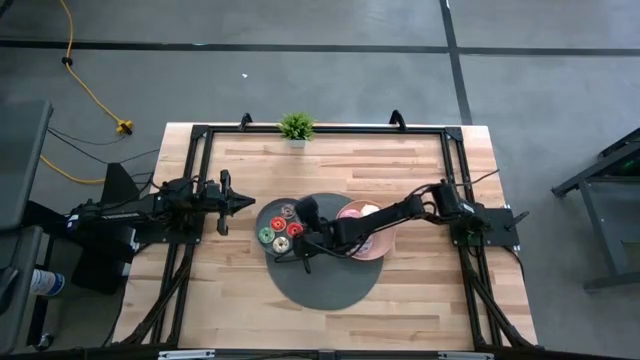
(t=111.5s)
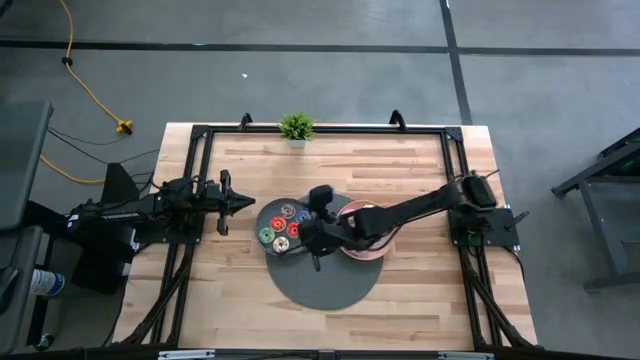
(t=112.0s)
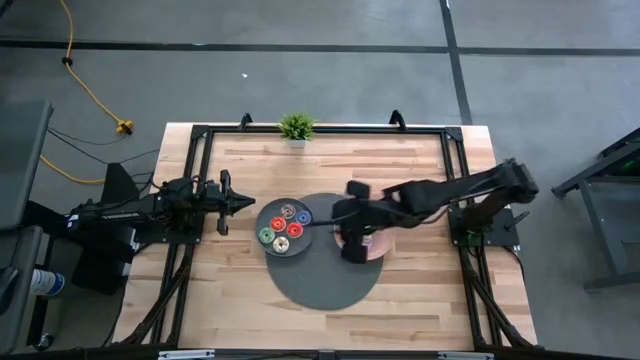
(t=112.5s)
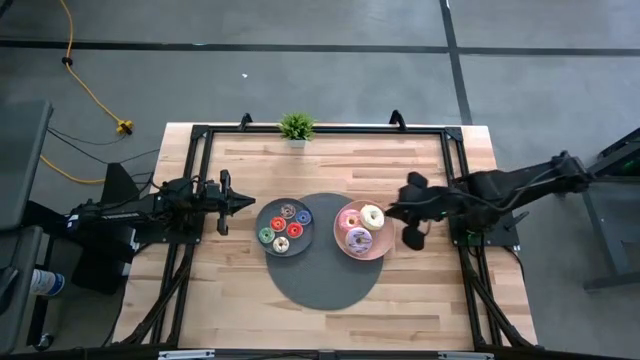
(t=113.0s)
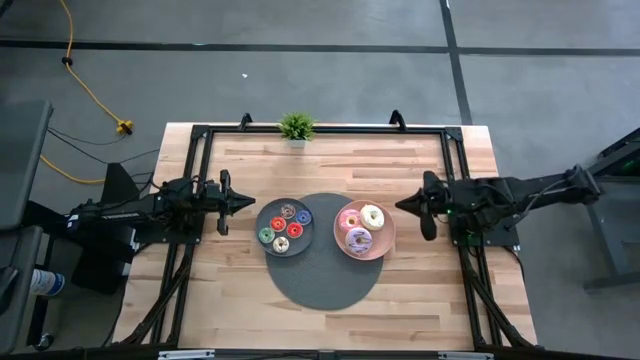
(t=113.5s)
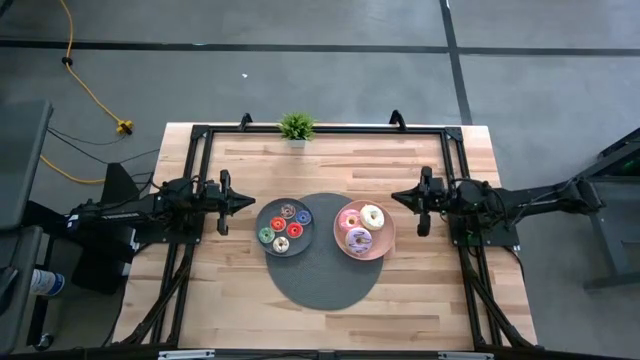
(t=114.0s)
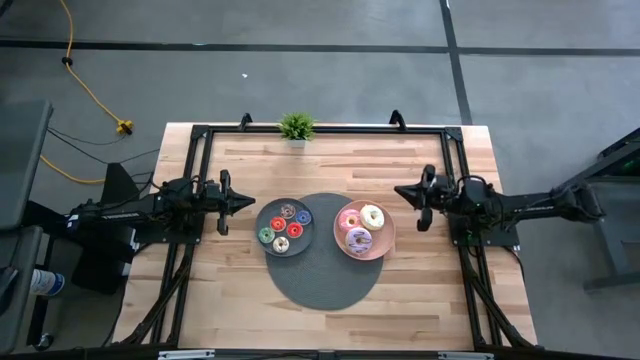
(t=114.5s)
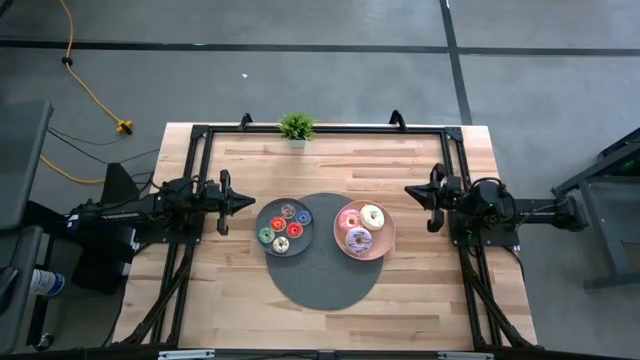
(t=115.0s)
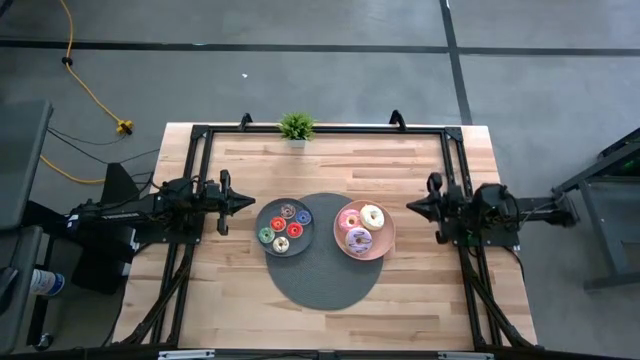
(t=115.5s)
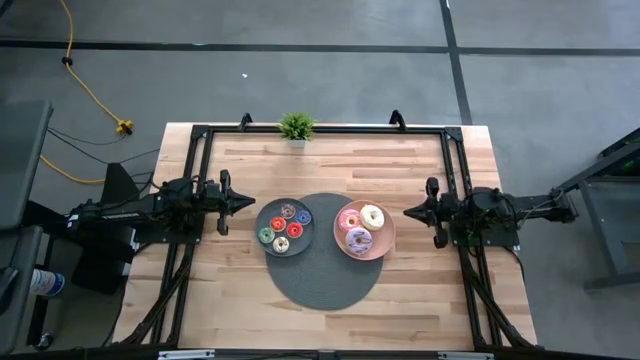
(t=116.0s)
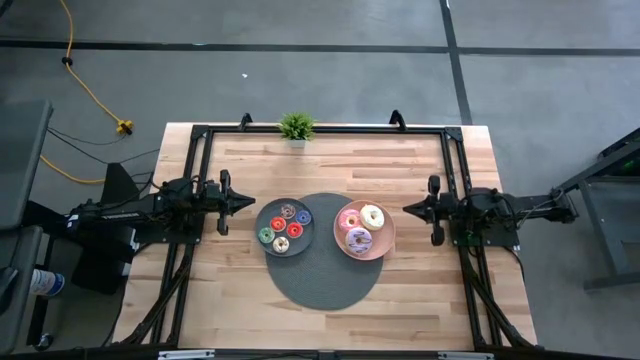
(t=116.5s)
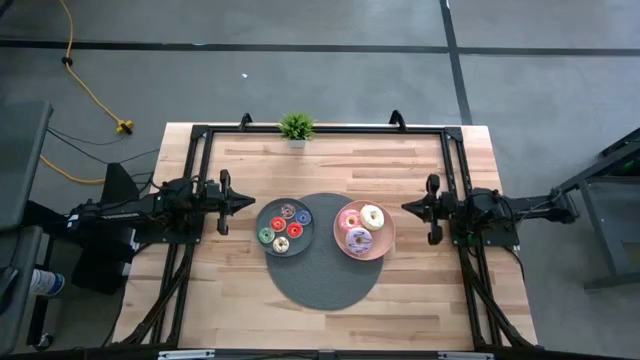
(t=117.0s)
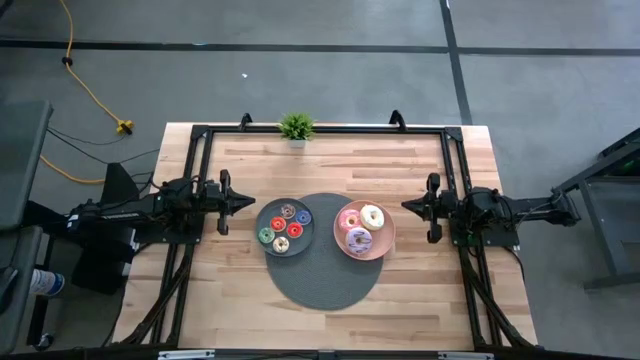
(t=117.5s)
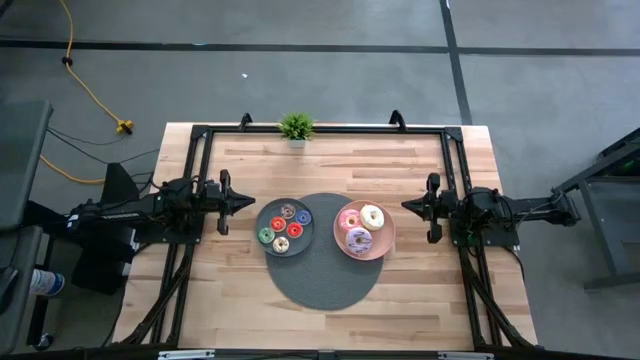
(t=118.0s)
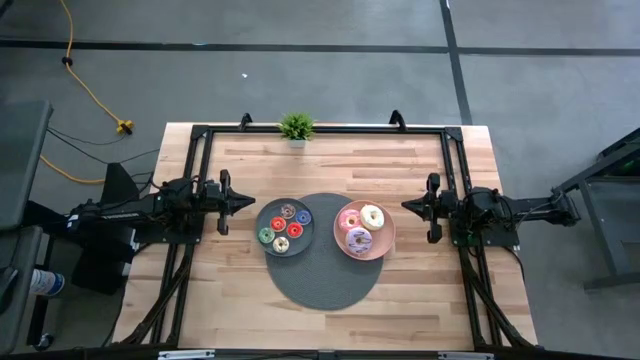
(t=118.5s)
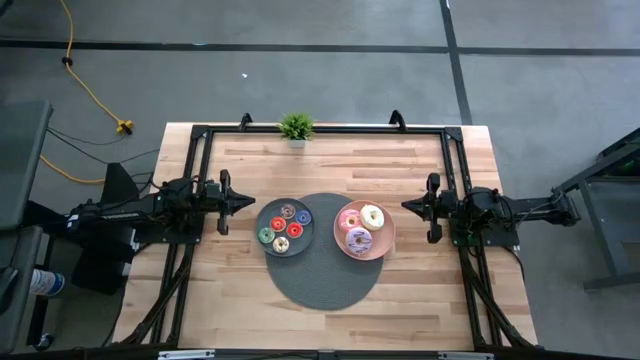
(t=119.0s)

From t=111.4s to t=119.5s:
Task: Pick & Place donuts
Return to Home Position

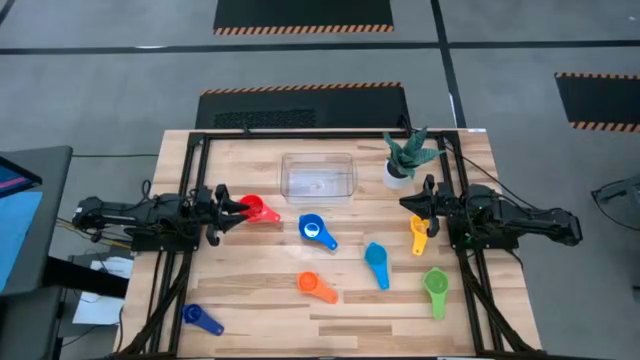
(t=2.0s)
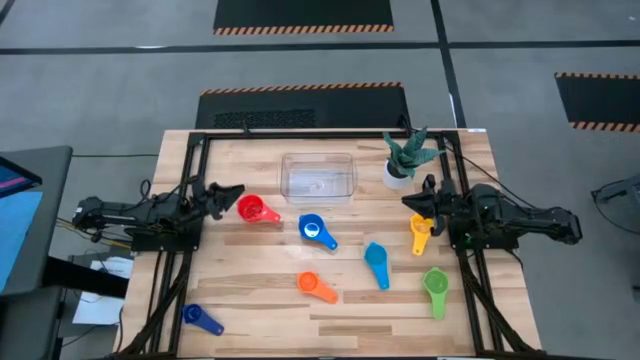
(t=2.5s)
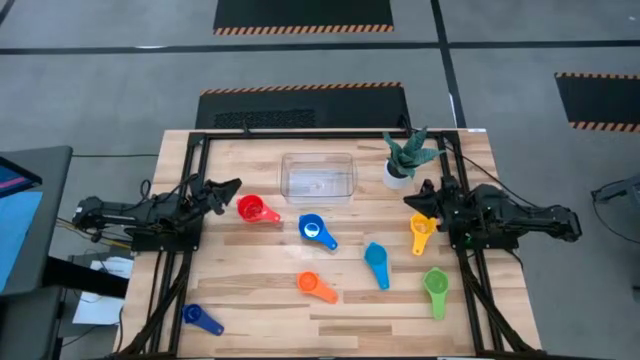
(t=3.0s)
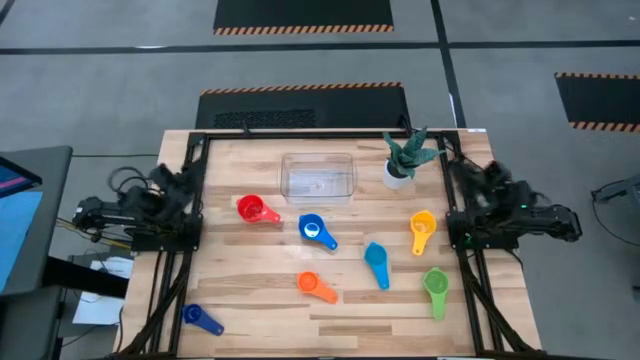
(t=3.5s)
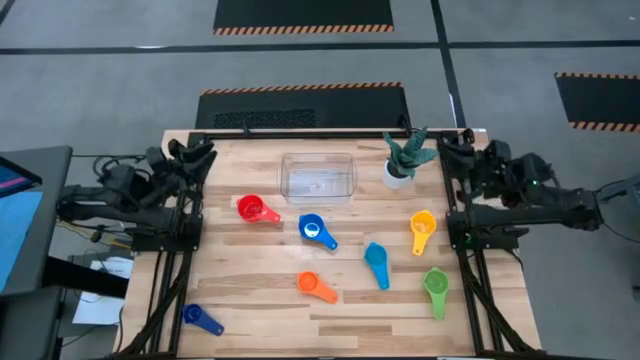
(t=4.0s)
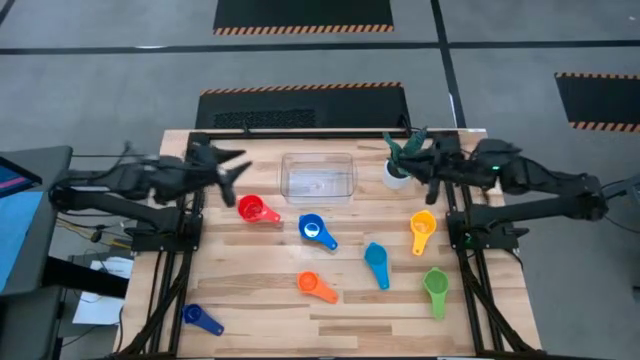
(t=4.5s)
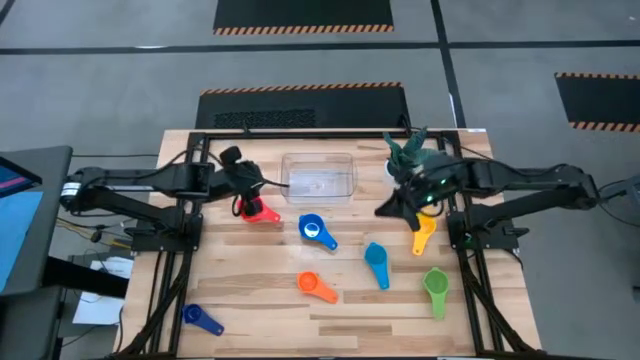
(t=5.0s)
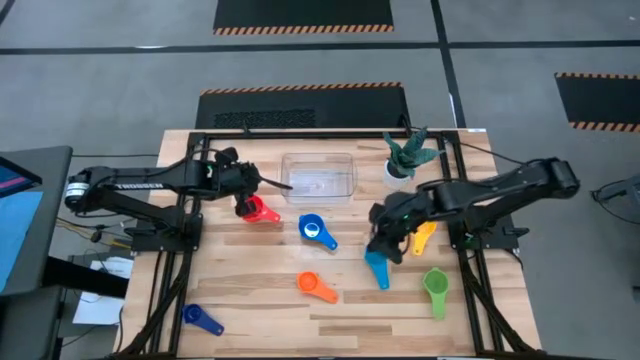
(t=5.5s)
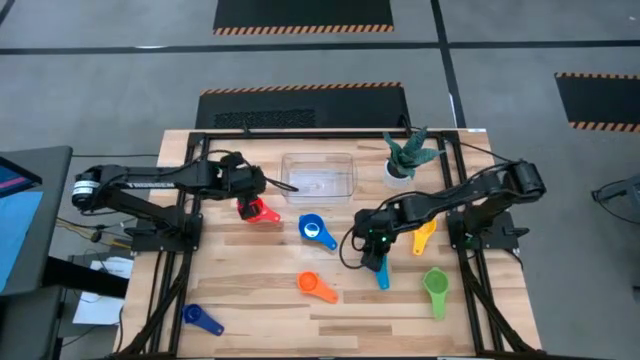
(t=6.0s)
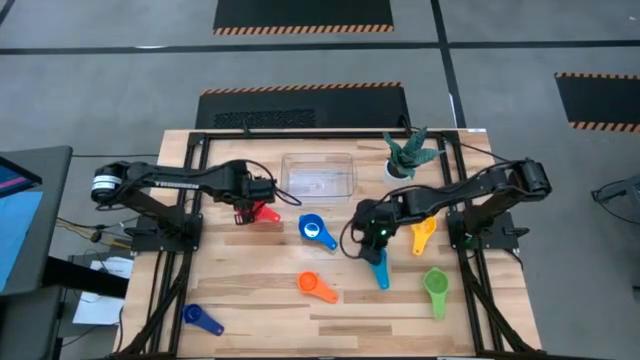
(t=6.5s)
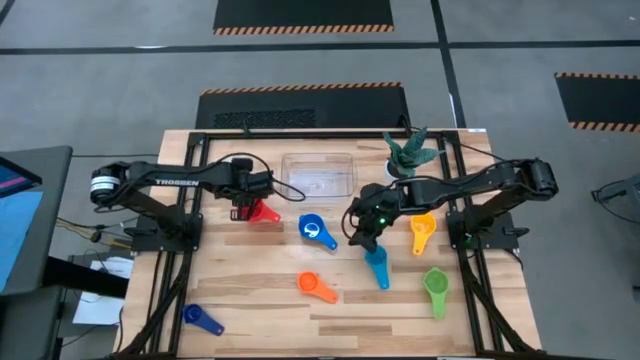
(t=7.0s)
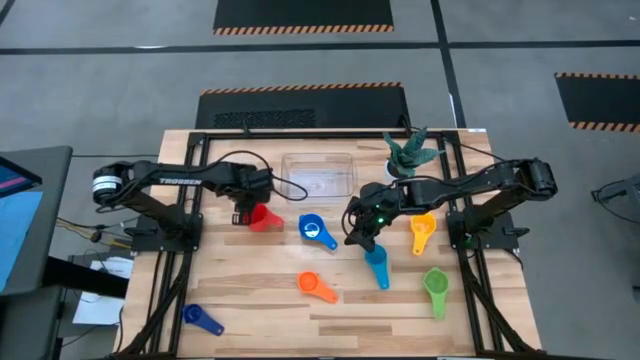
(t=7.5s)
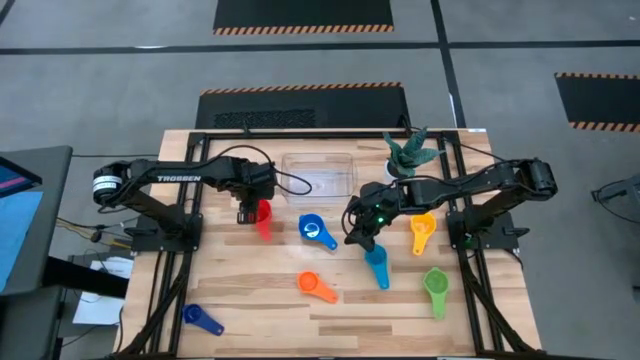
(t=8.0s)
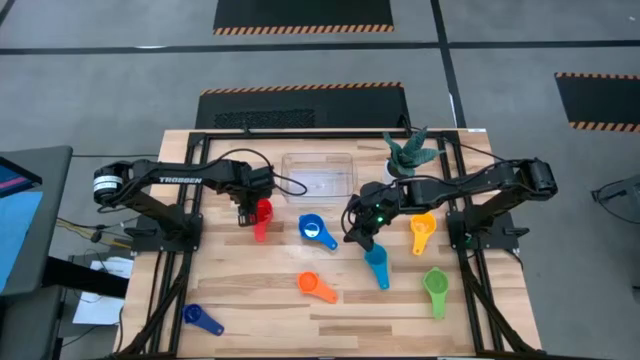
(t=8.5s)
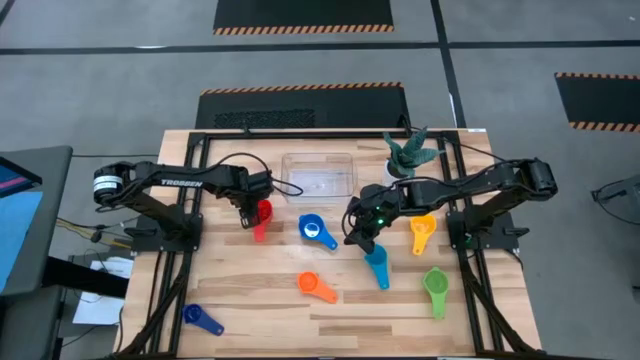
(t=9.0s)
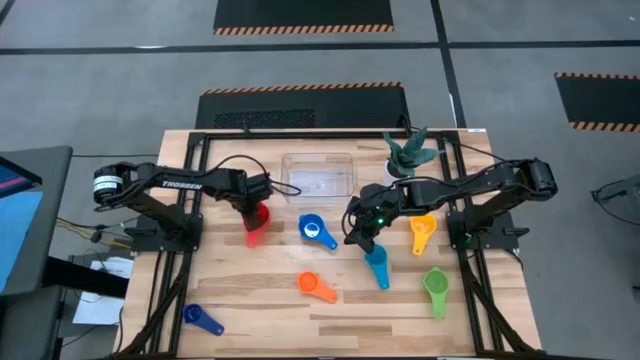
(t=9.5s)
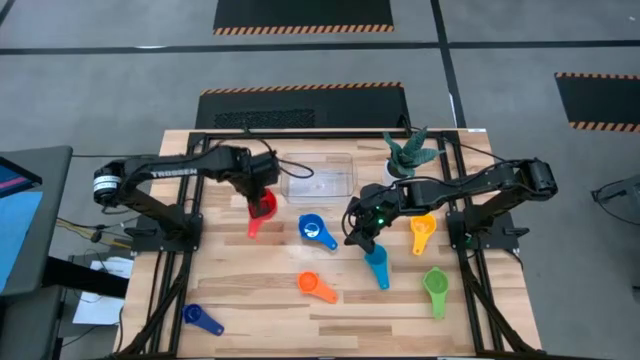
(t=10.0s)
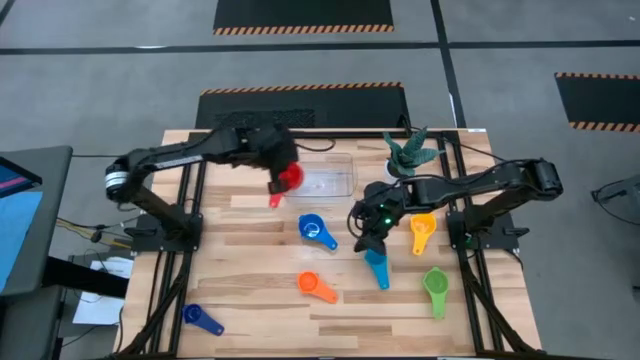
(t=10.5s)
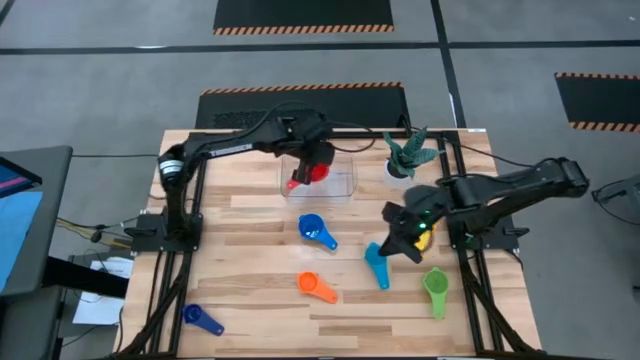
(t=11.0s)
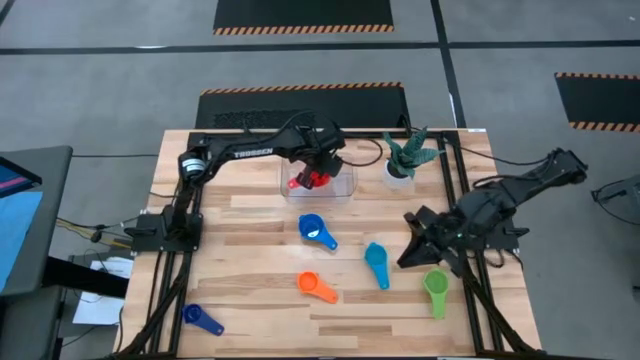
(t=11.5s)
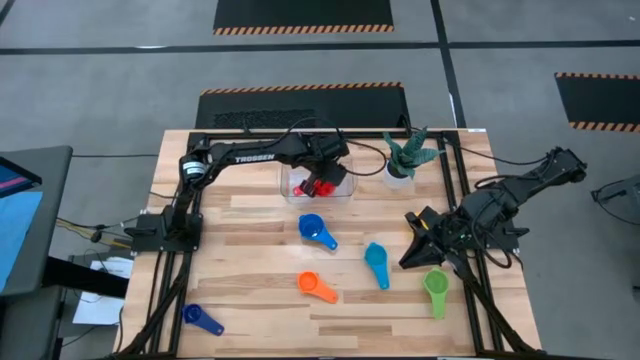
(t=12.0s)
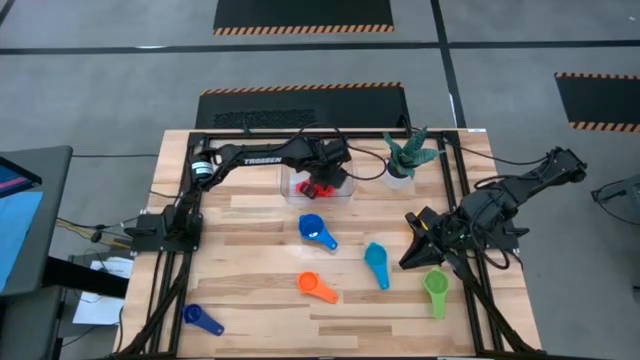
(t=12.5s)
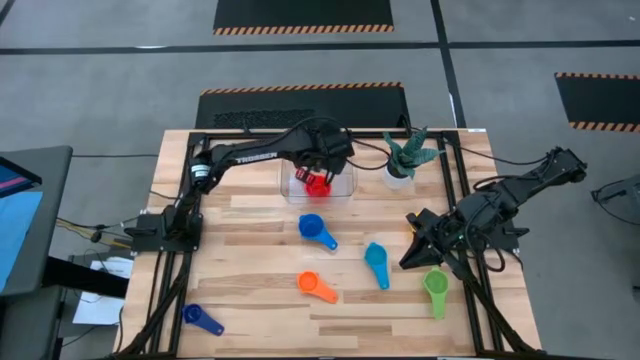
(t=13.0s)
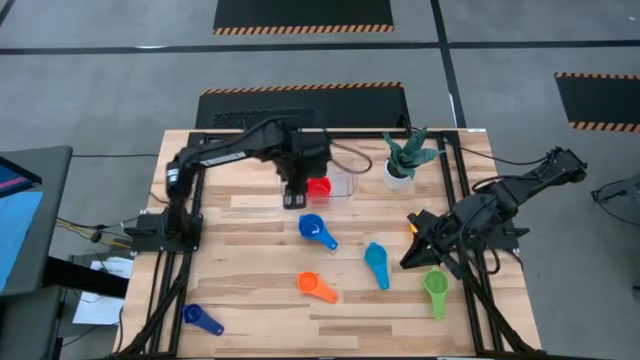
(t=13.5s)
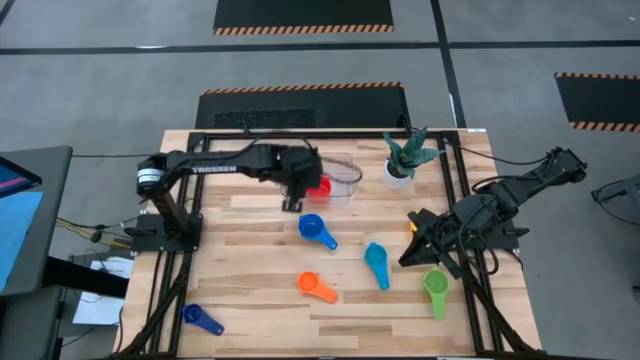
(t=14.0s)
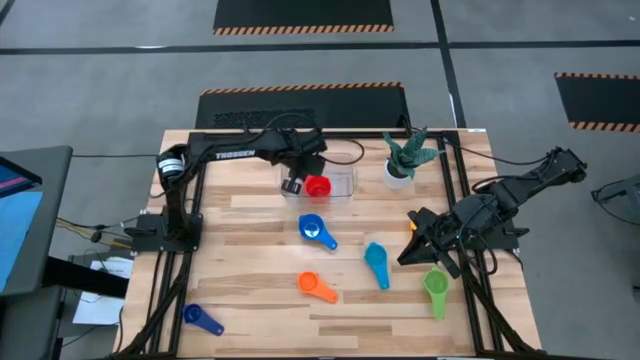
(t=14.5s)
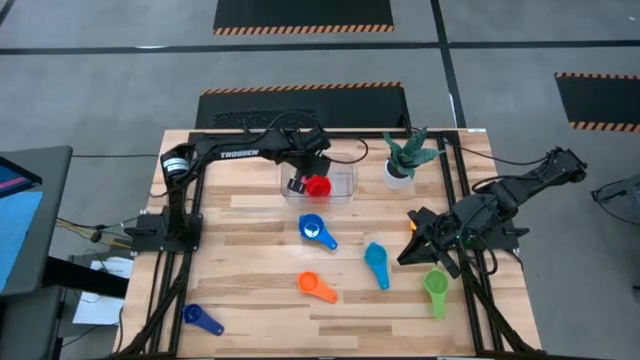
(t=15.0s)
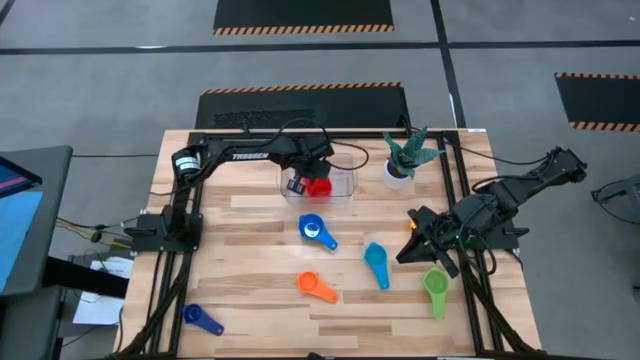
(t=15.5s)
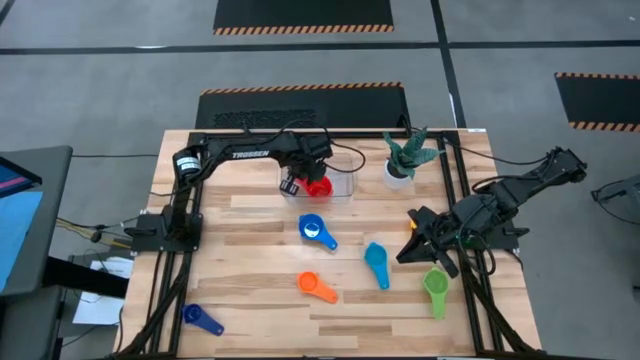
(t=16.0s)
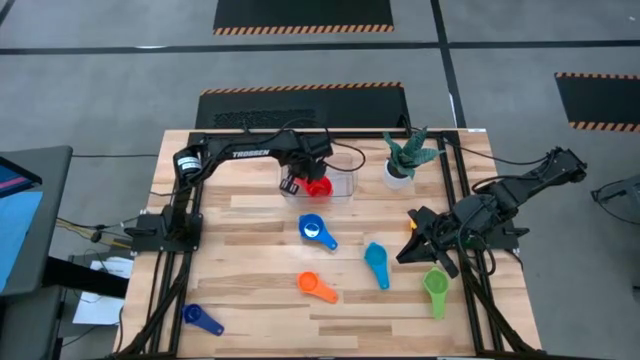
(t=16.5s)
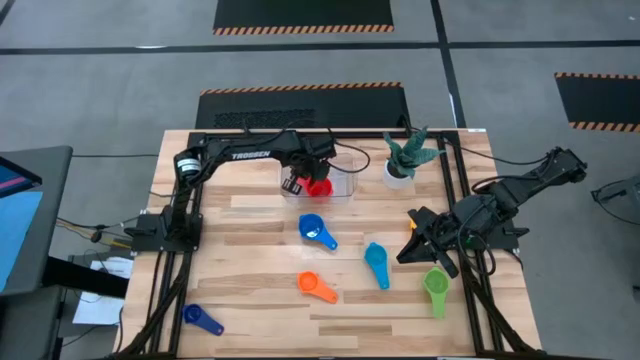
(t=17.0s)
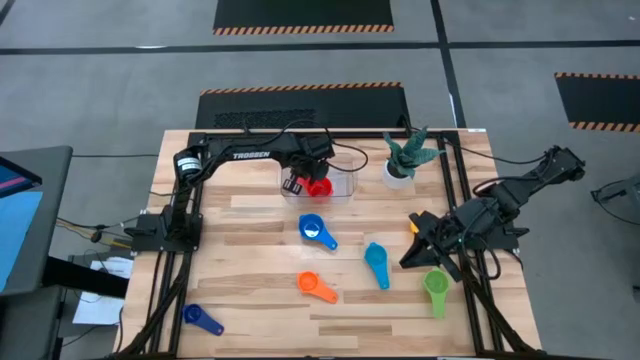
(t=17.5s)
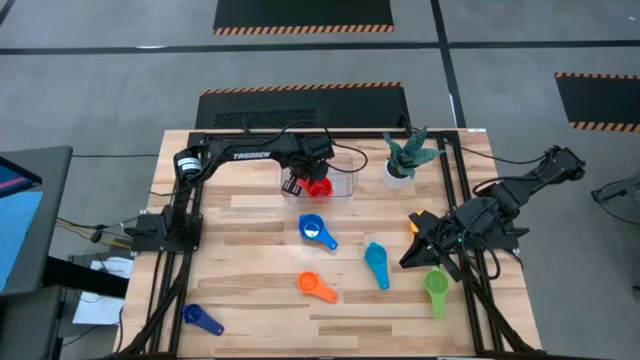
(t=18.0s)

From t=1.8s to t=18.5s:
Task: Nest measuring cups in basket
Put the red measuring cup into the transparent bin
